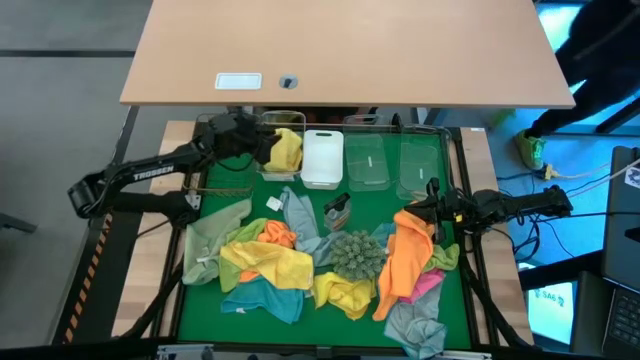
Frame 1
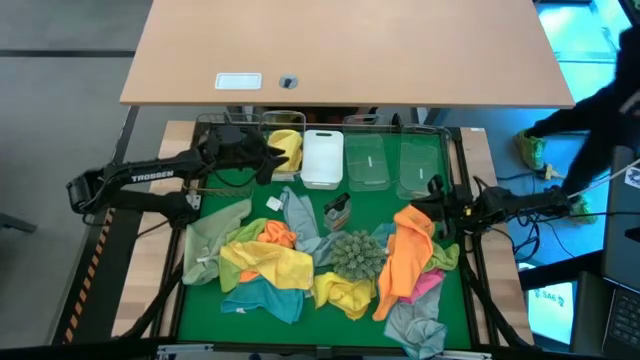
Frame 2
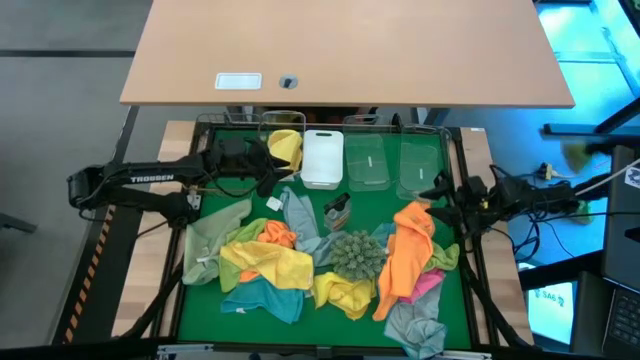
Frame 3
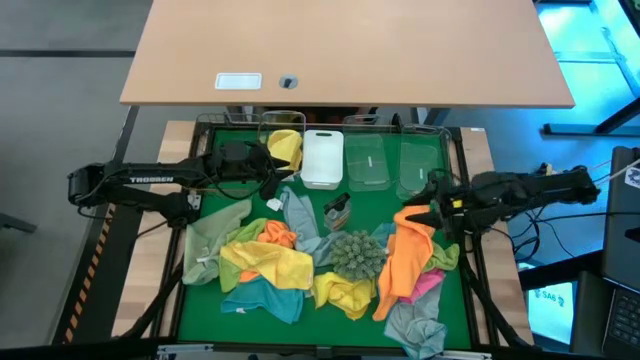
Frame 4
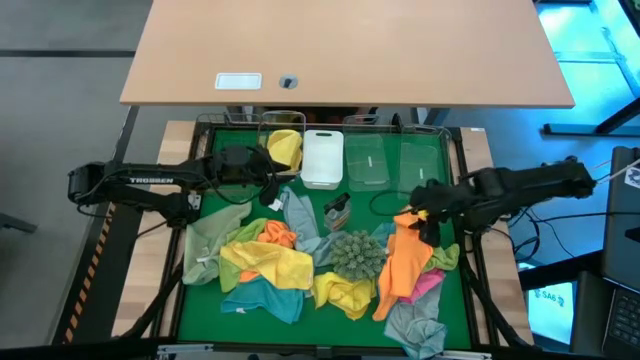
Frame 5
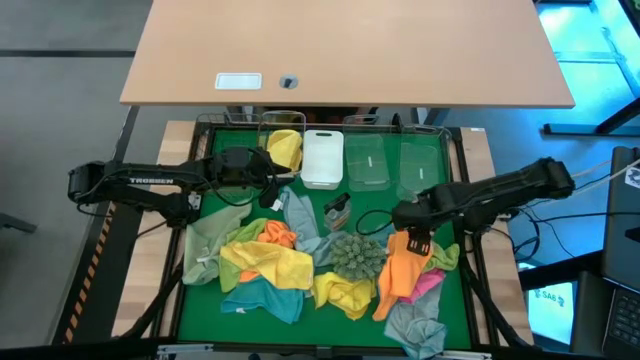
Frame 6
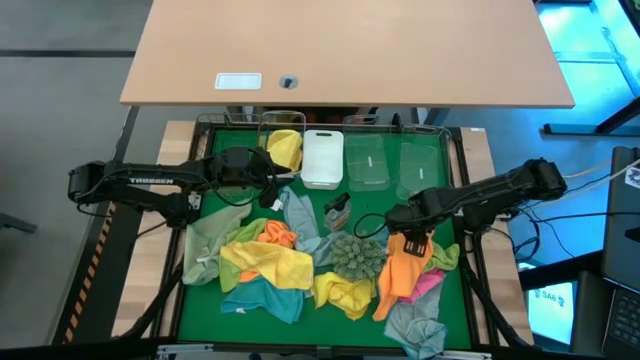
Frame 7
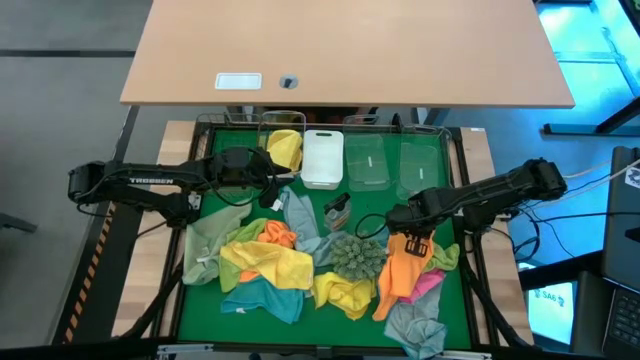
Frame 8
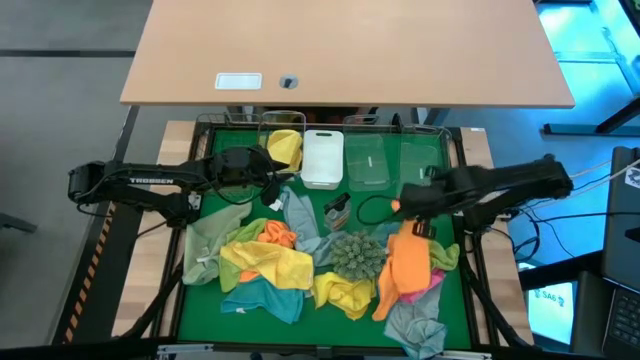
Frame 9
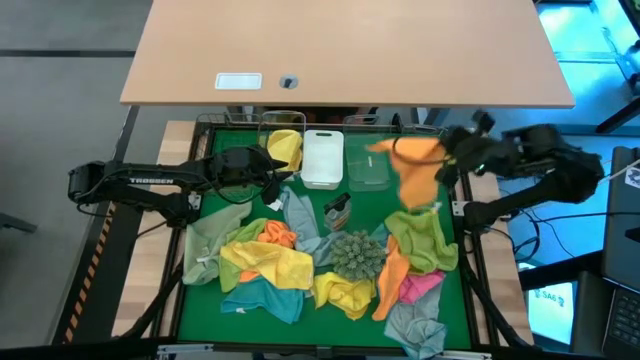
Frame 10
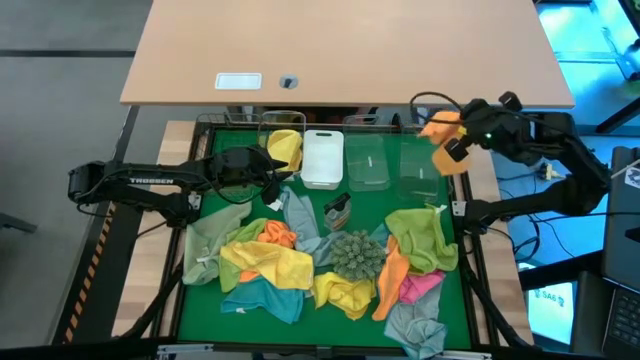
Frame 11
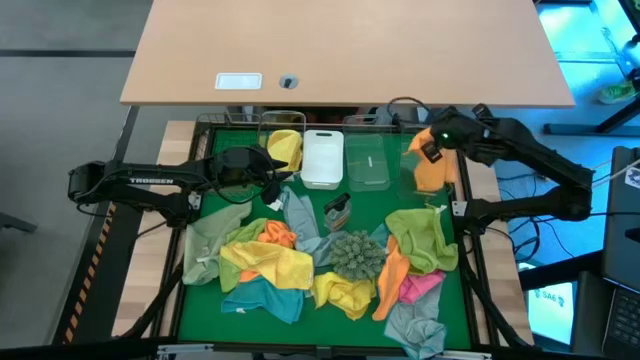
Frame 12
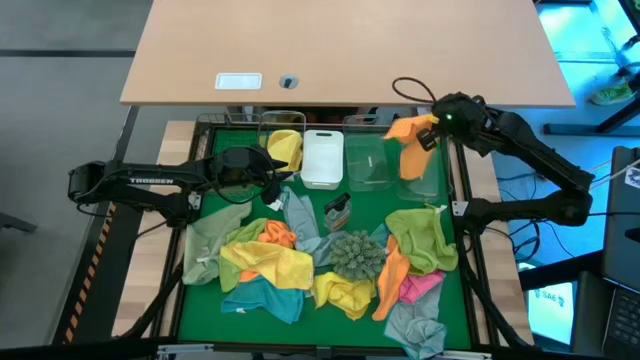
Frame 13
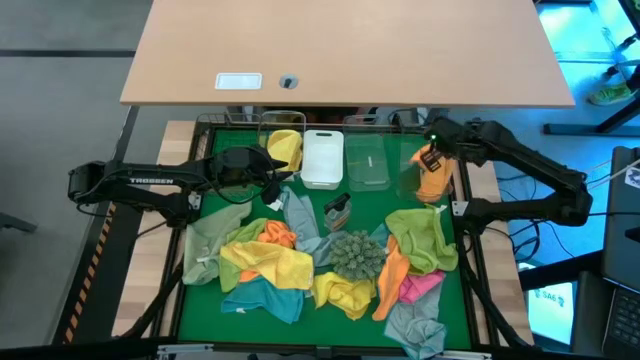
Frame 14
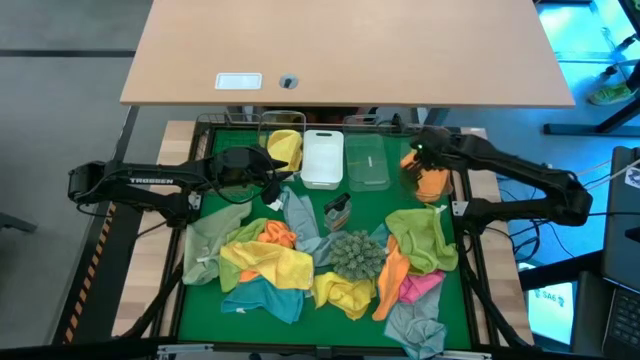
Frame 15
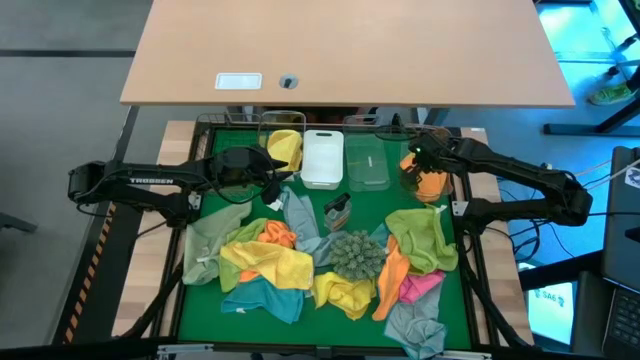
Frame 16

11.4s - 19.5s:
Task: Sort microfiber towel by color & place in baskets
Put the top right orange microfiber towel into the right transparent bin

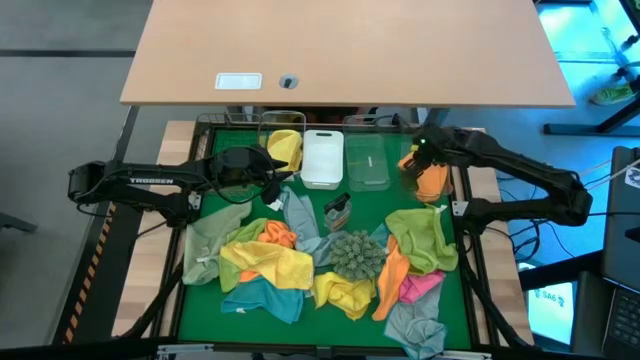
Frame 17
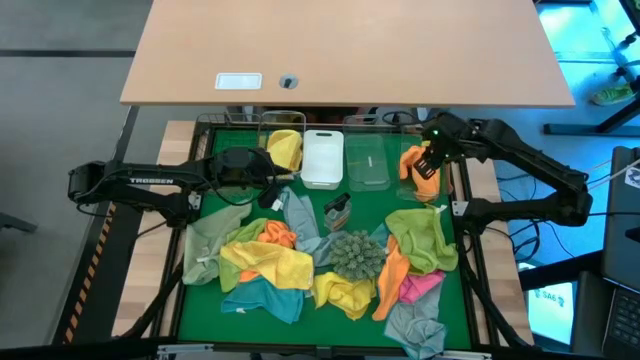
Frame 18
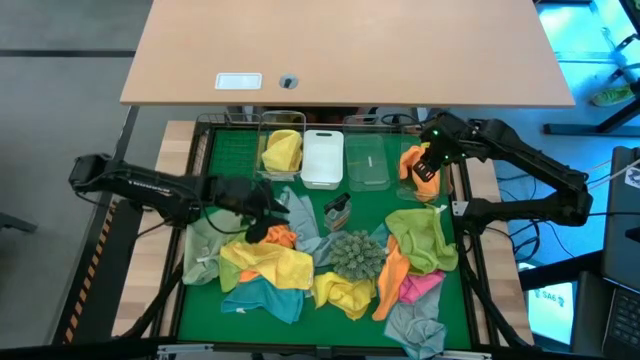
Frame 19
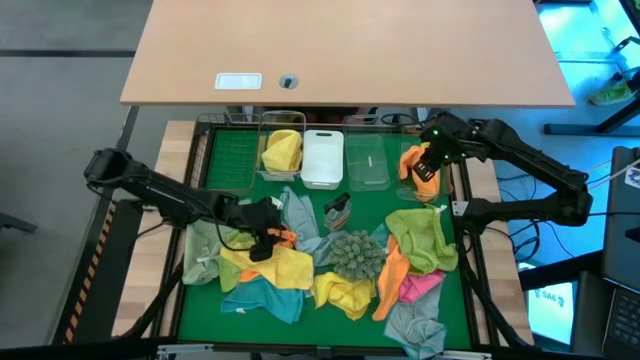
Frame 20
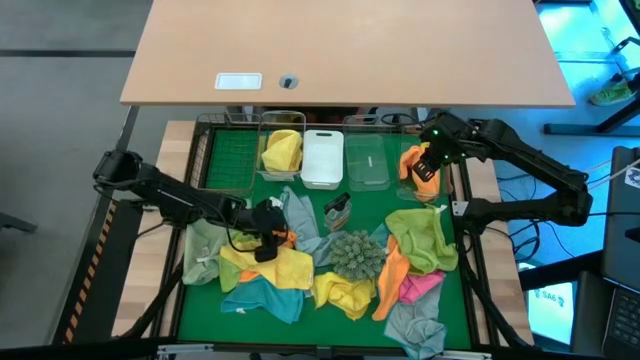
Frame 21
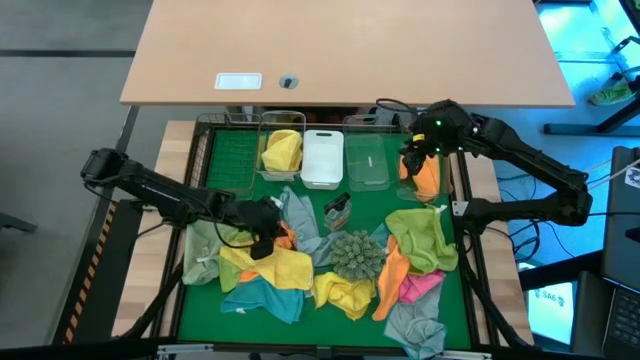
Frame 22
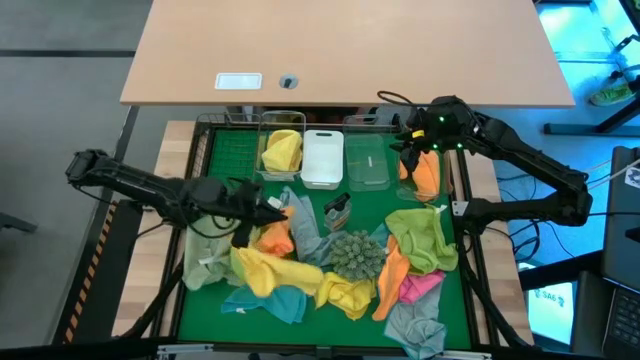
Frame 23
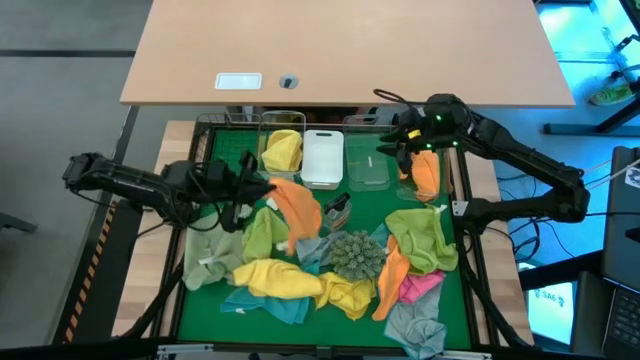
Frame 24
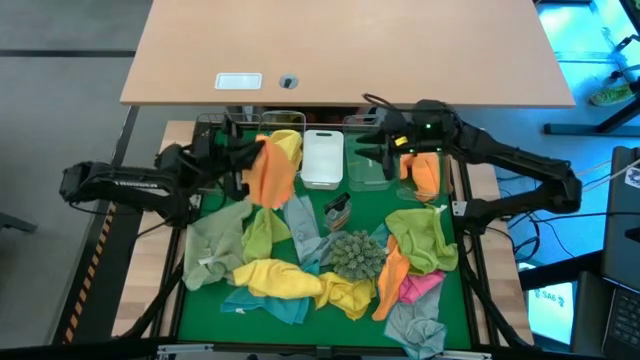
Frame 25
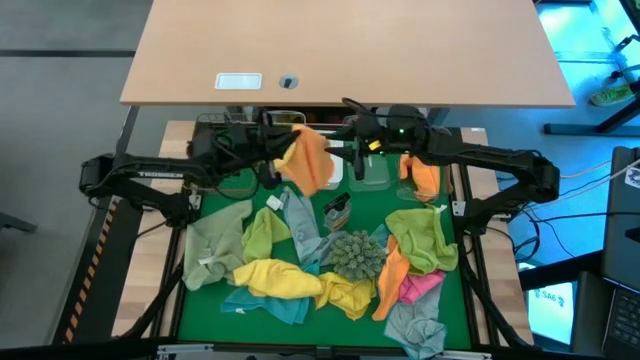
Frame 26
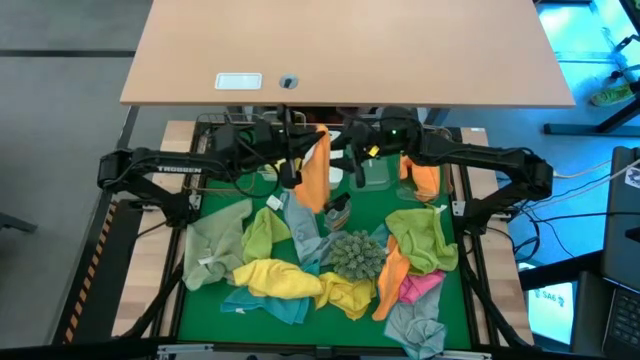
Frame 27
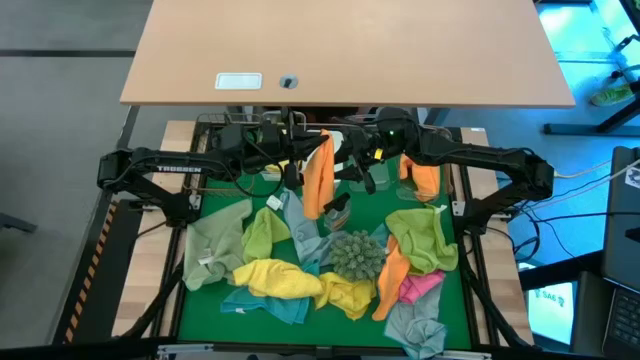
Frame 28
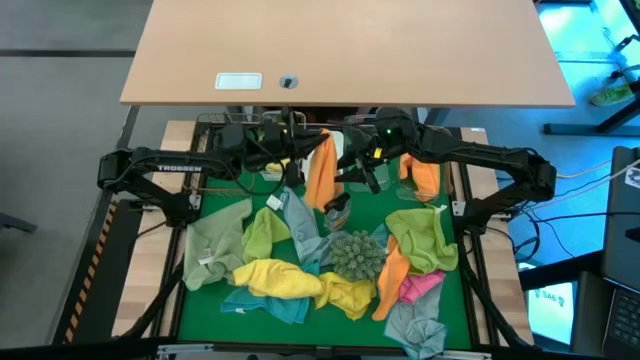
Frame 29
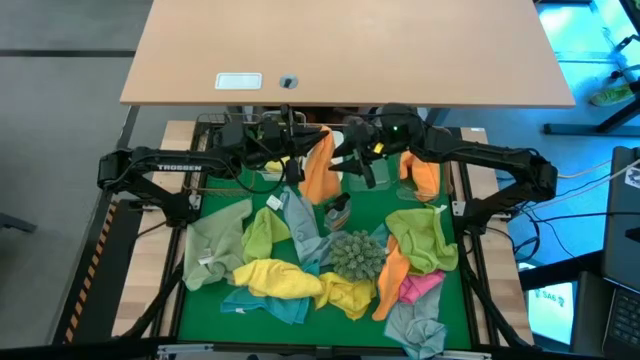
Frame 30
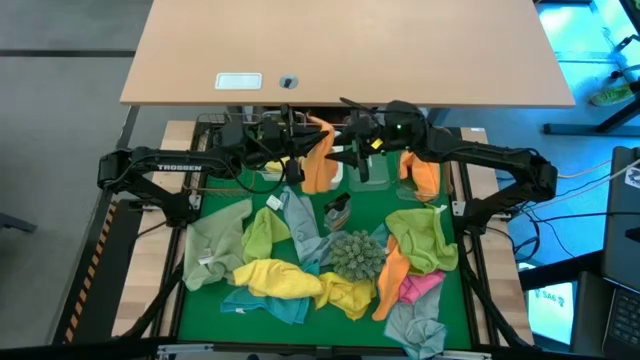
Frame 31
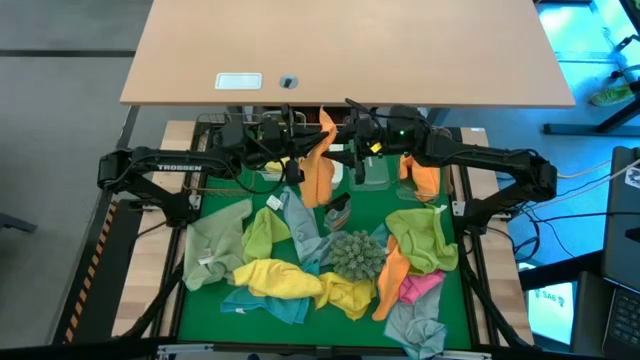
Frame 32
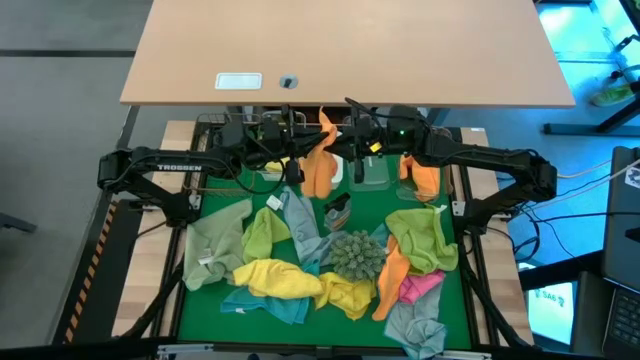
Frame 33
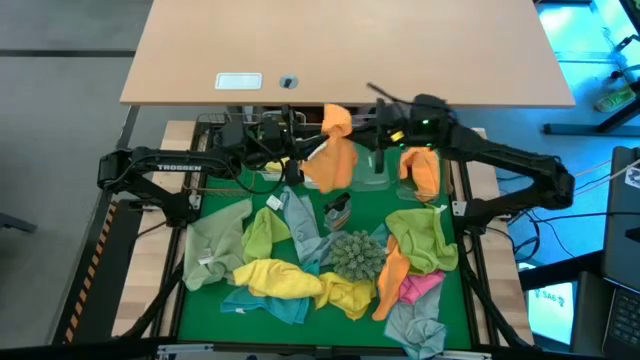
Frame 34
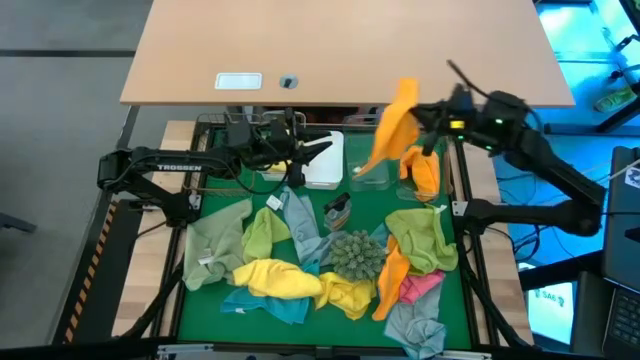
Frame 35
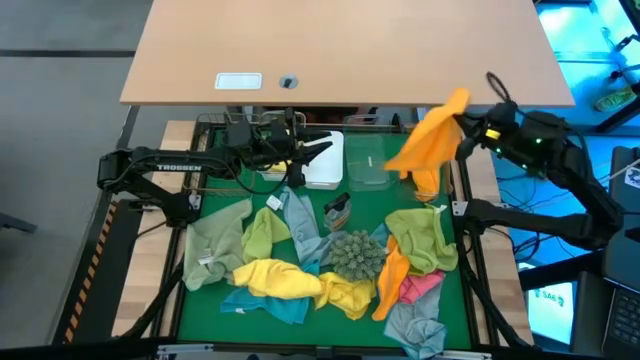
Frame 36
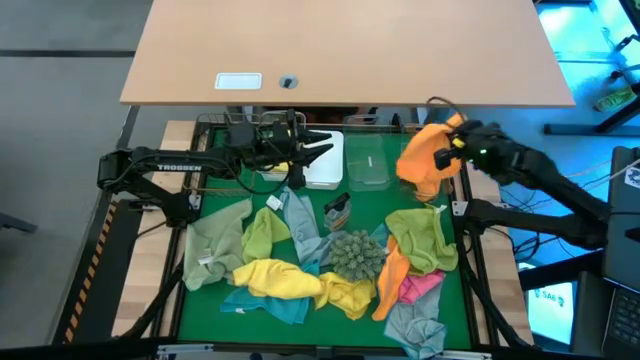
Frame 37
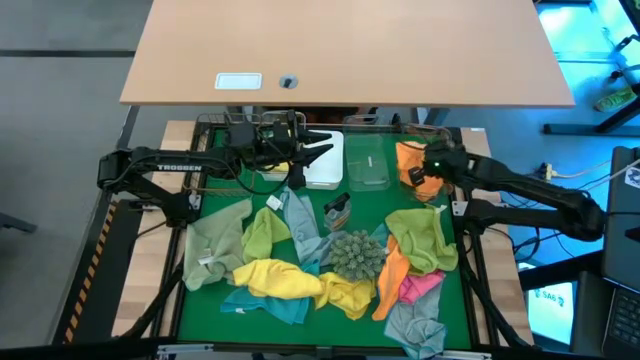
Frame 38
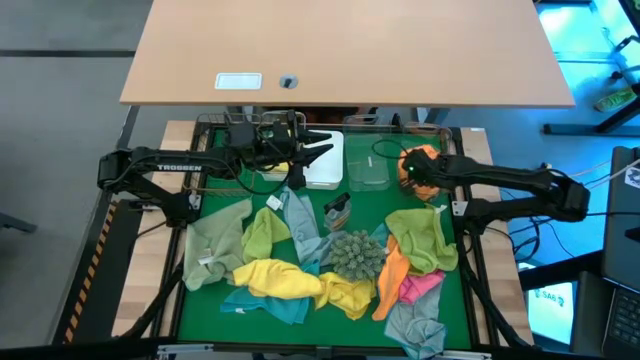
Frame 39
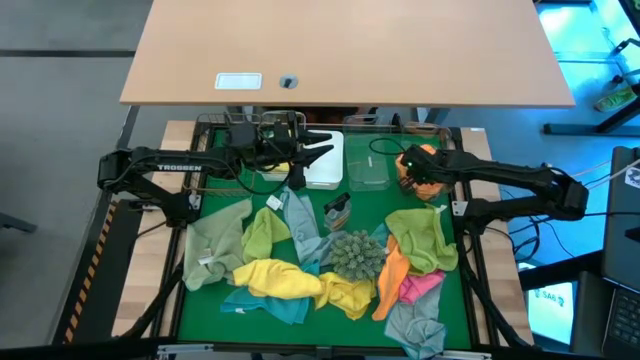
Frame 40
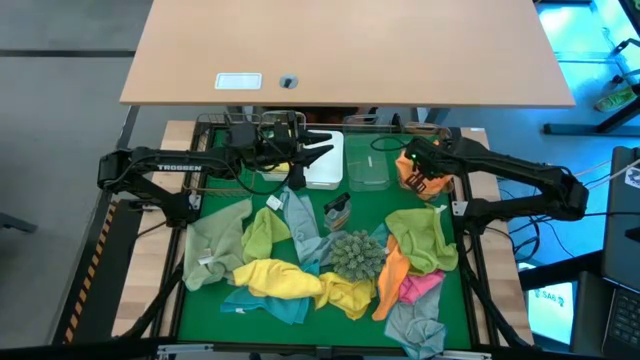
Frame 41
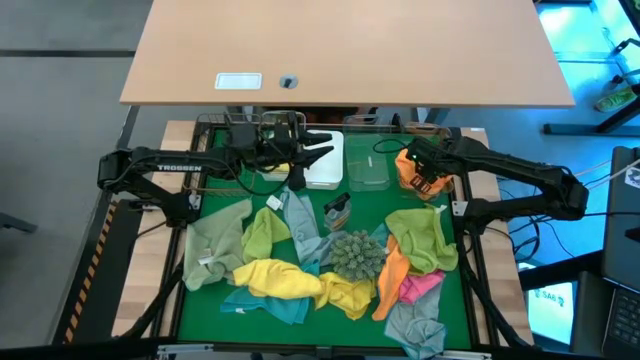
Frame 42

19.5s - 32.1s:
Put the left orange microfiber towel into the right transparent bin
